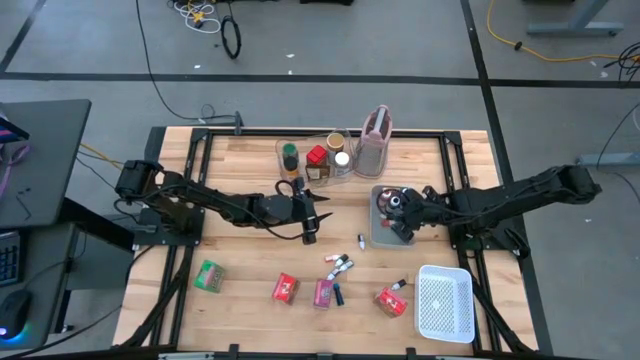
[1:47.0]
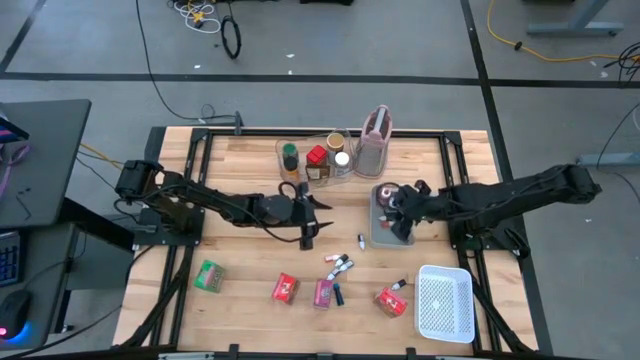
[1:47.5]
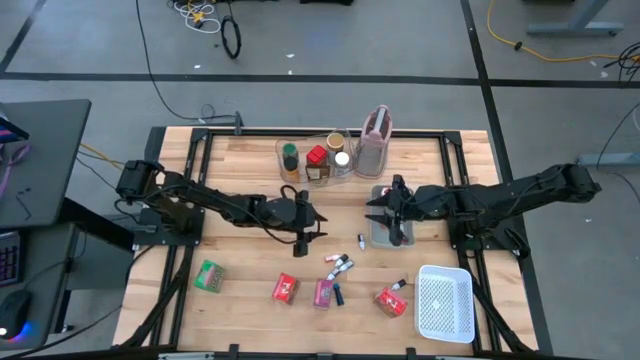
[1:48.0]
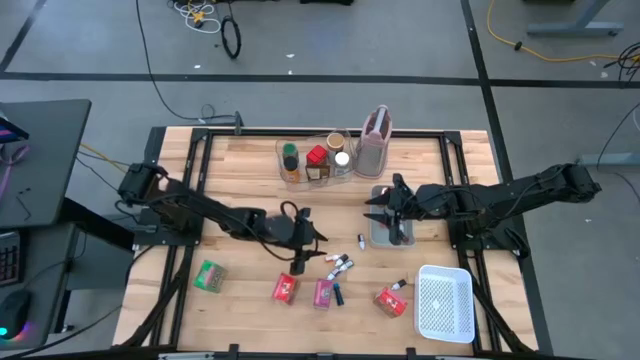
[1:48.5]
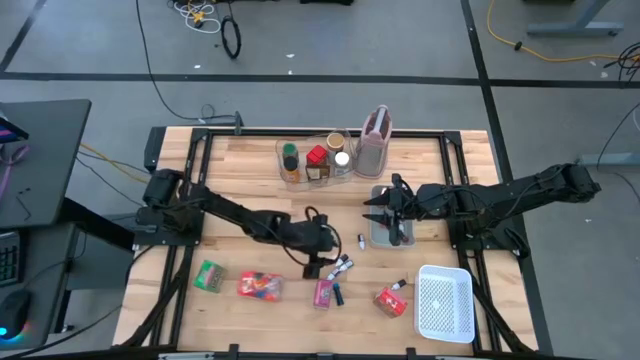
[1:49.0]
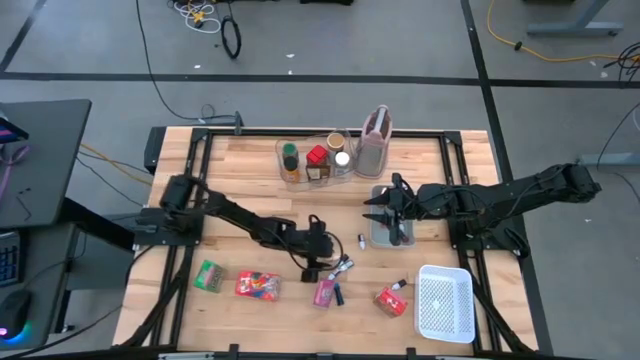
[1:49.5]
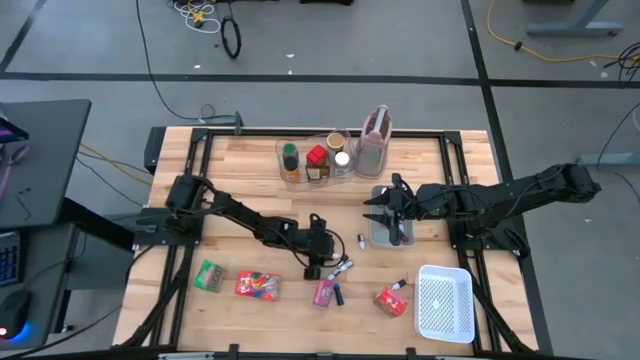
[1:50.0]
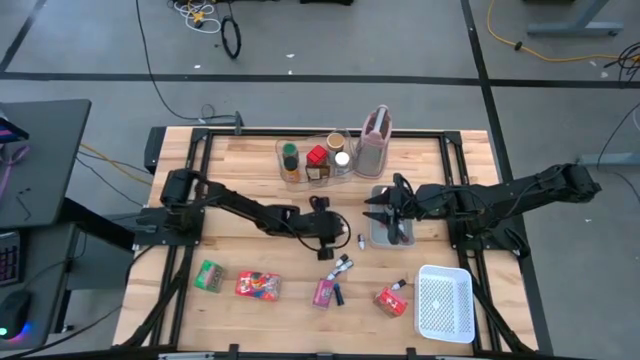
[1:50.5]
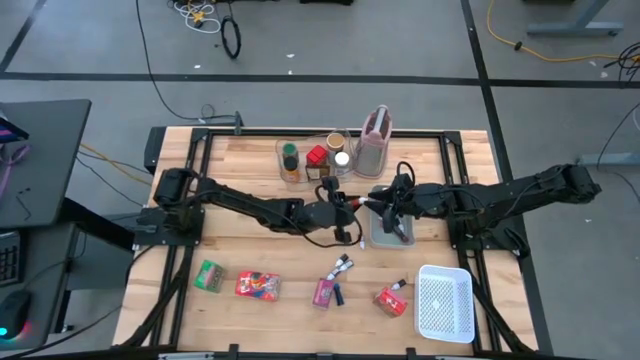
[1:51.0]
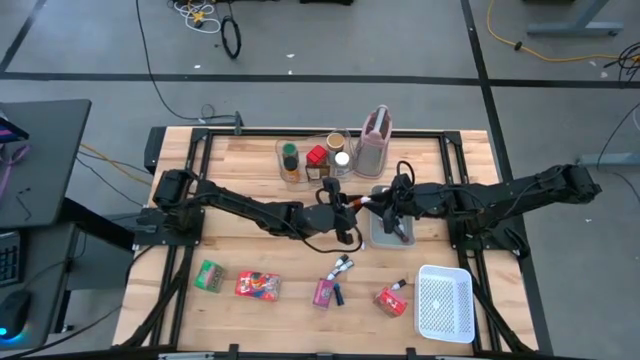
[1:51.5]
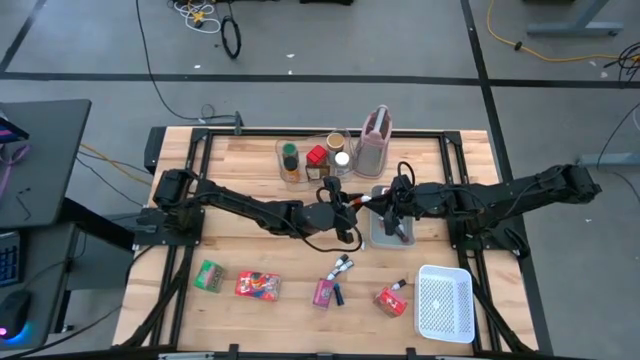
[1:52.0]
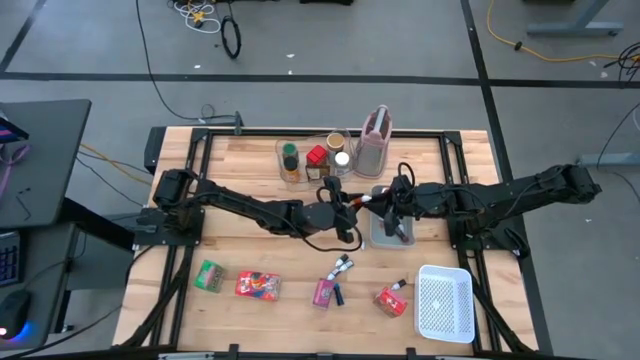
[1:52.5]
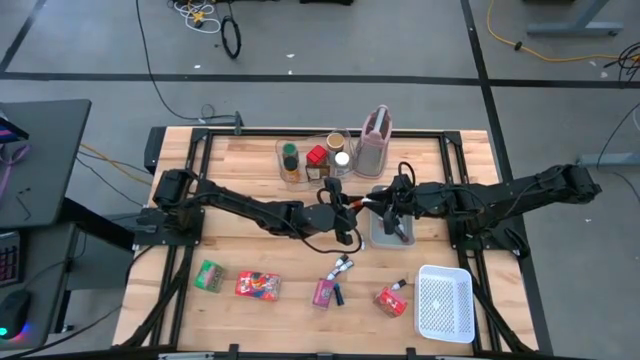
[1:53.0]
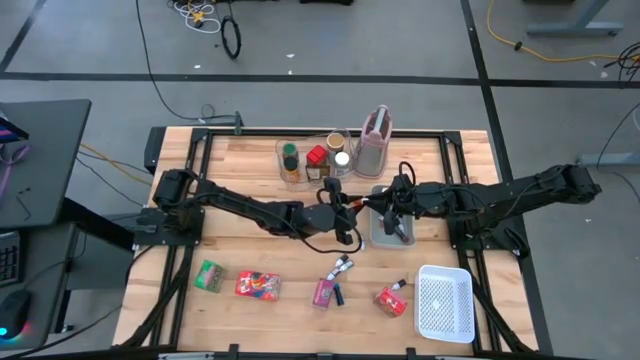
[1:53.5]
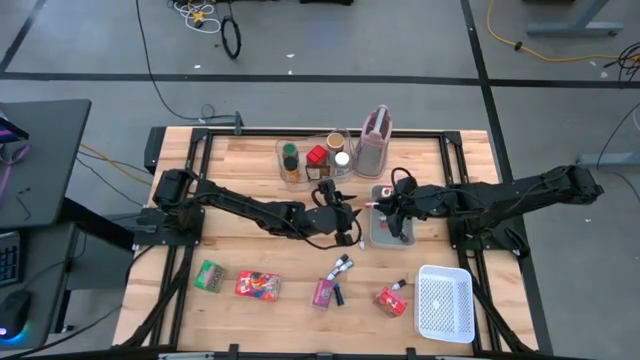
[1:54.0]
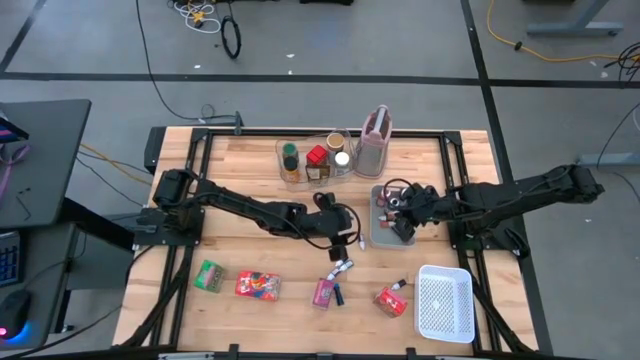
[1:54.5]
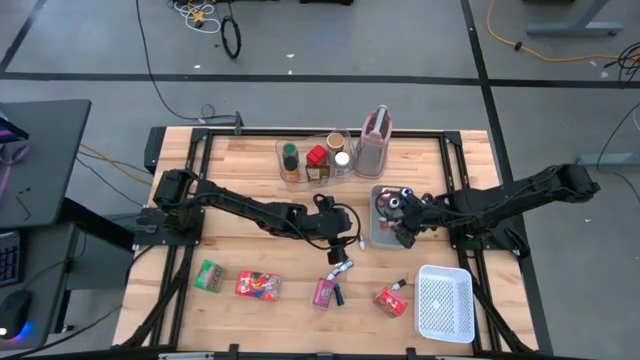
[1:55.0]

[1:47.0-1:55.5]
Task: Pick & Place Kitchen Items
Put the small orange food coloring bottle into the gray bin

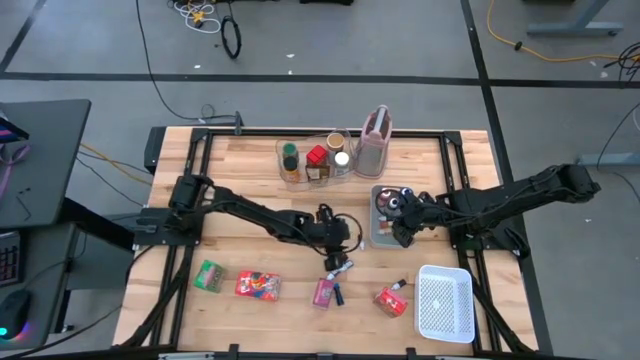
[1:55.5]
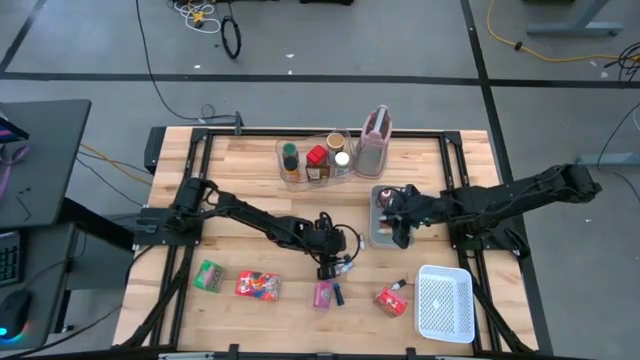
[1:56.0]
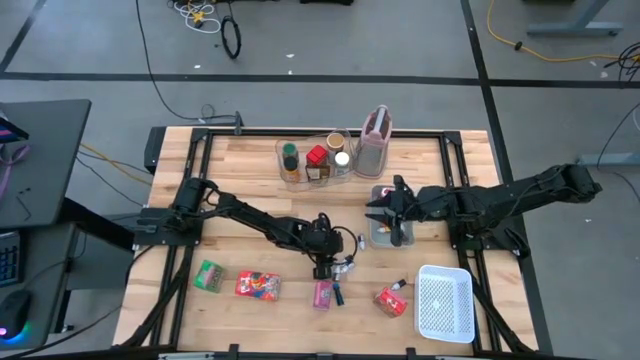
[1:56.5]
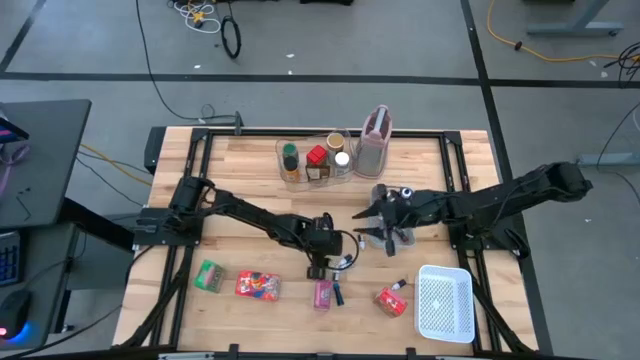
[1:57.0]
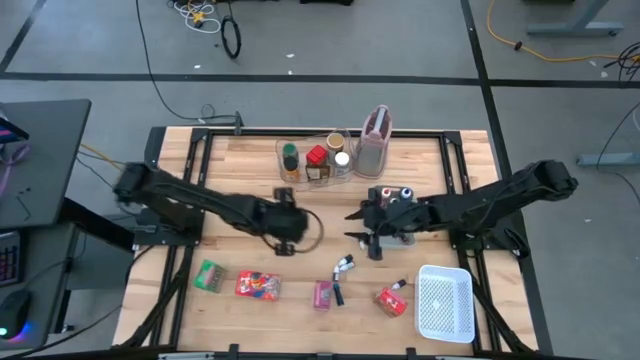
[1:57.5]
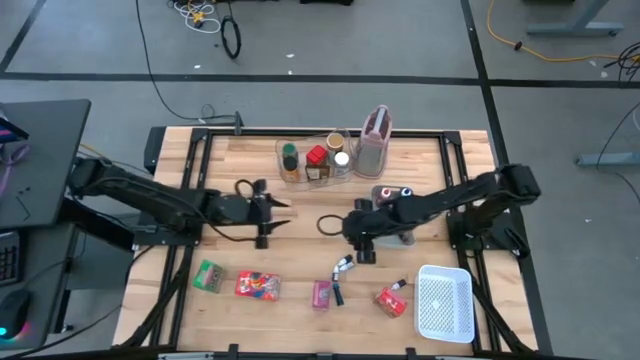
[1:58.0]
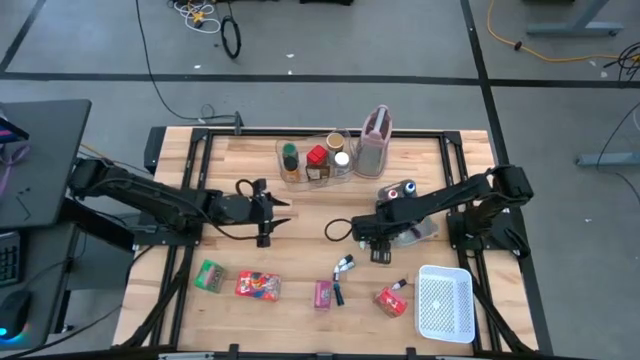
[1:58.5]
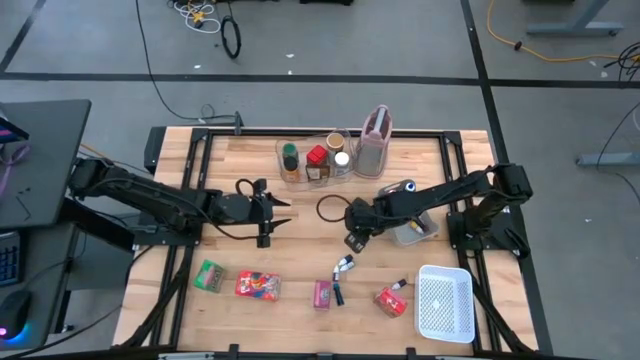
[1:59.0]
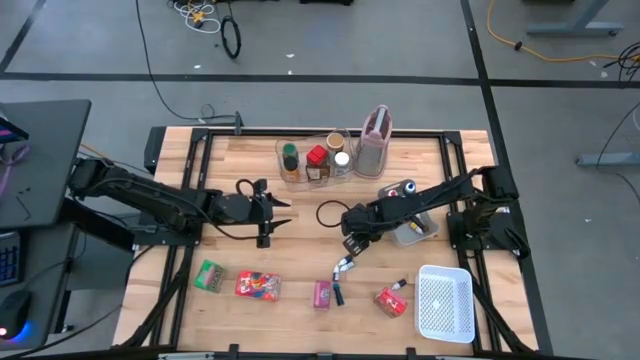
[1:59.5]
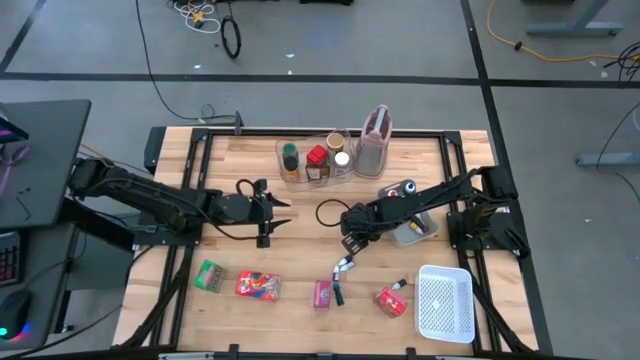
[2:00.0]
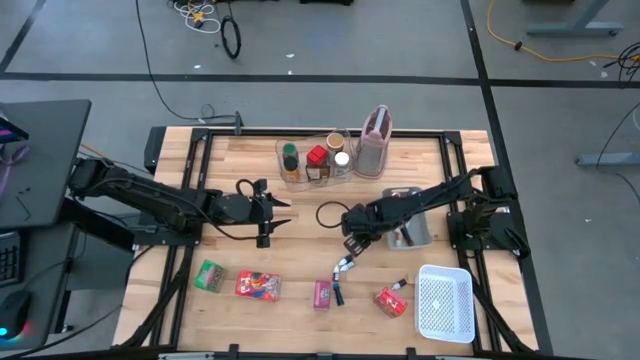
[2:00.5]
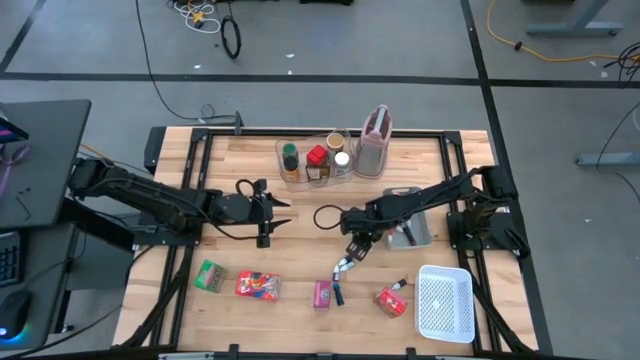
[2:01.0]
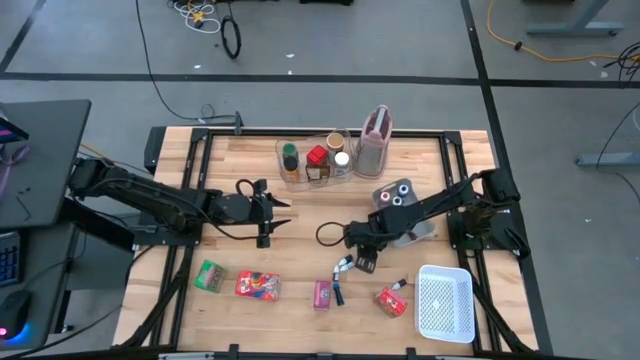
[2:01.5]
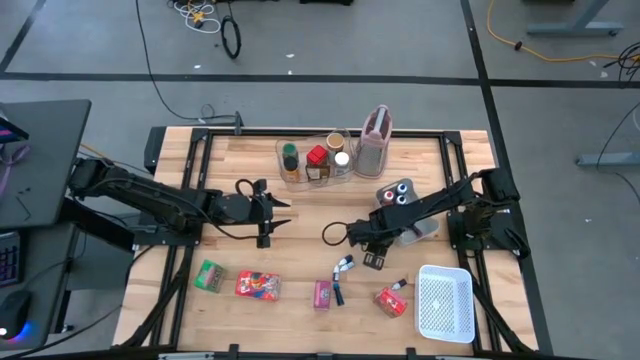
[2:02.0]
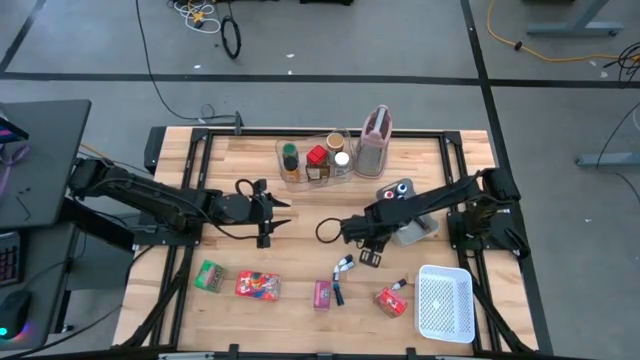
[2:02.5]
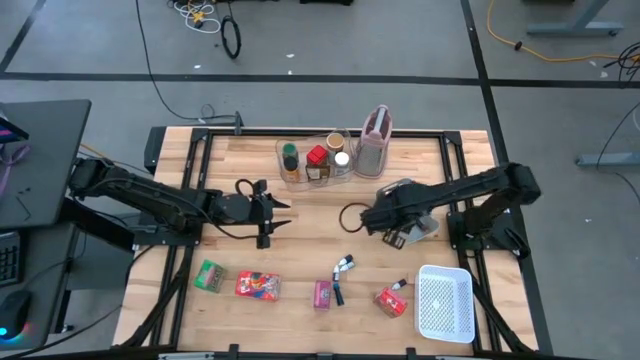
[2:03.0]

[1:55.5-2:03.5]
Put the small red food coloring bottle into the gray bin

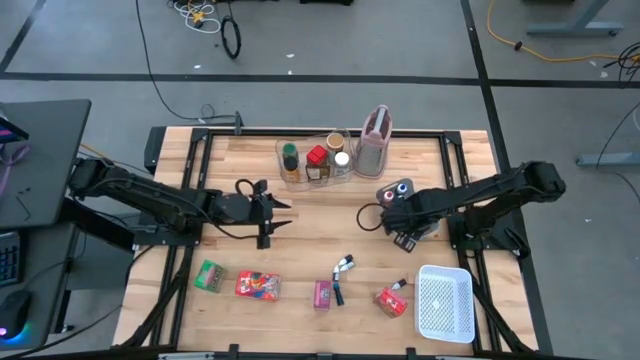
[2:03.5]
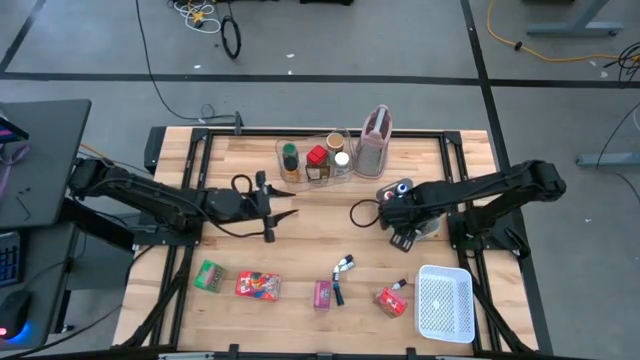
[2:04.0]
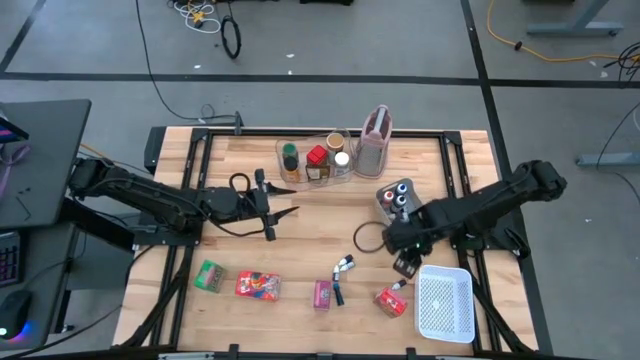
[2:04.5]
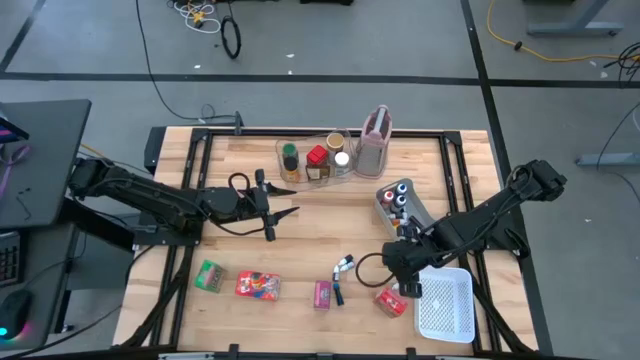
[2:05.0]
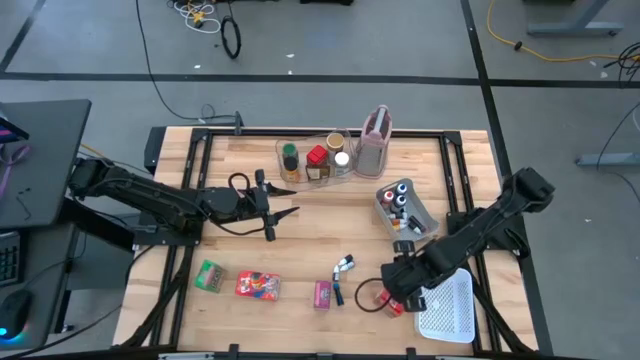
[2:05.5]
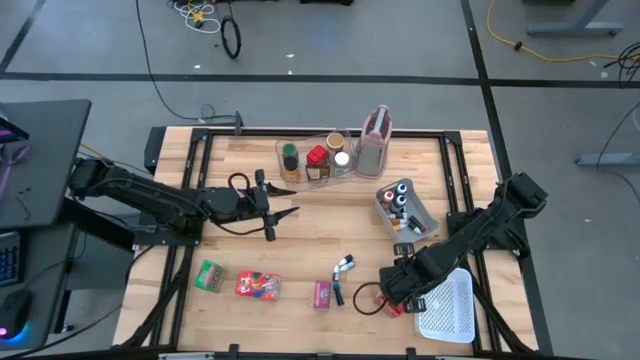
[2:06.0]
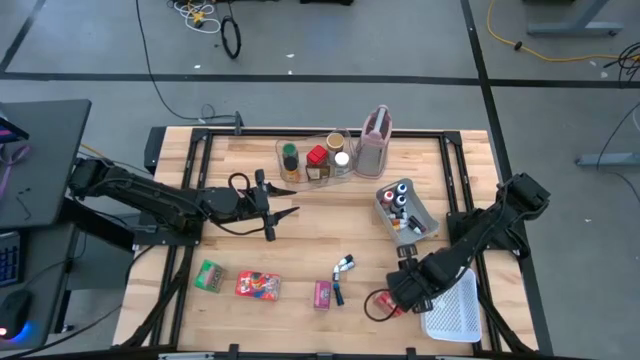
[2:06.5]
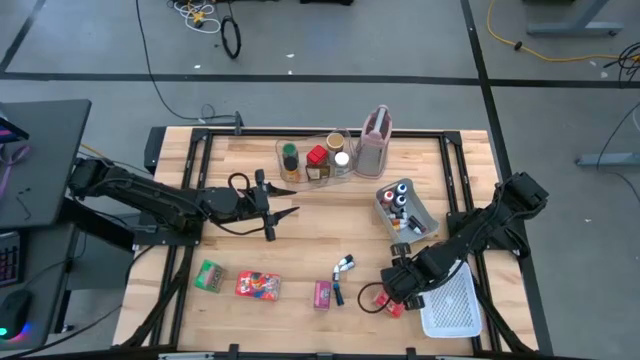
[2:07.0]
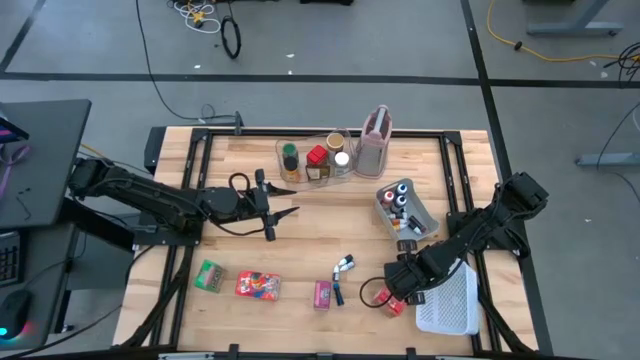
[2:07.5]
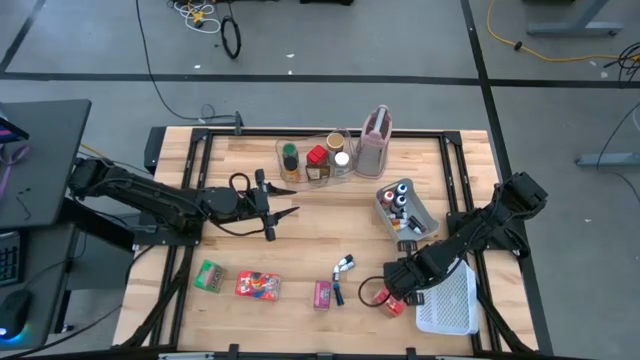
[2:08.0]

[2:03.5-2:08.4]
Put the small black food coloring bottle into the gray bin
